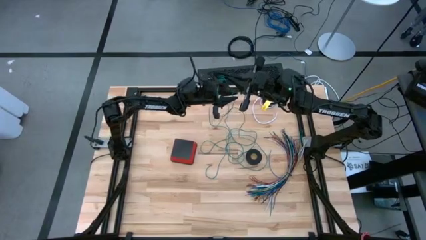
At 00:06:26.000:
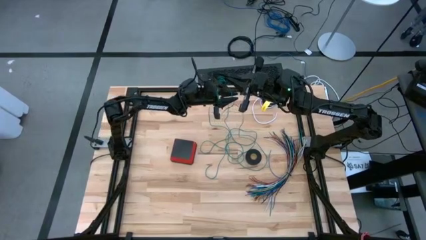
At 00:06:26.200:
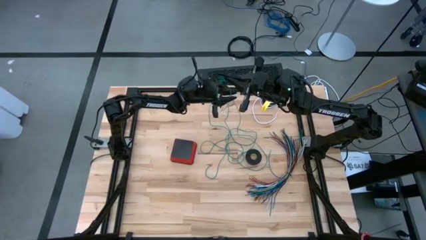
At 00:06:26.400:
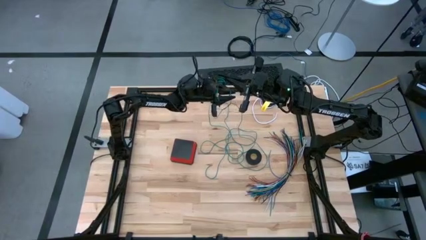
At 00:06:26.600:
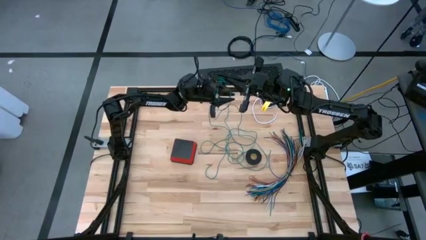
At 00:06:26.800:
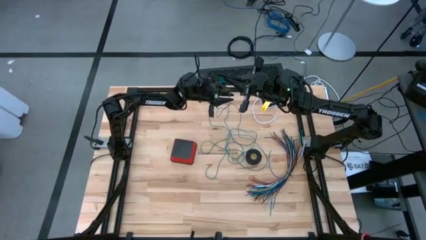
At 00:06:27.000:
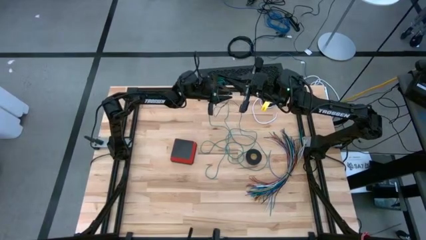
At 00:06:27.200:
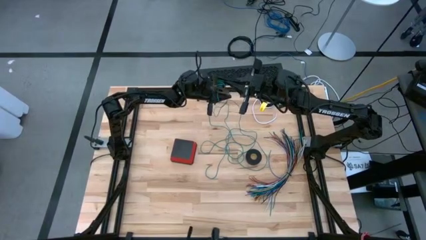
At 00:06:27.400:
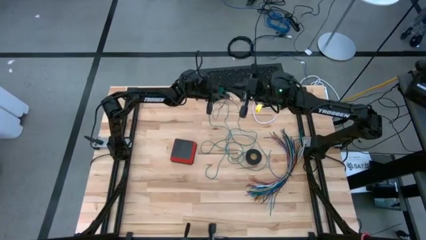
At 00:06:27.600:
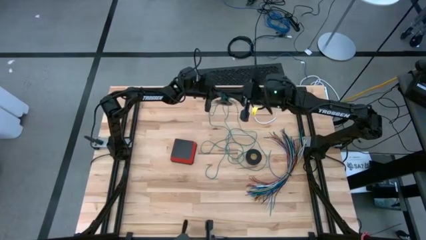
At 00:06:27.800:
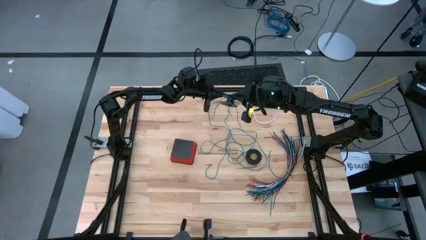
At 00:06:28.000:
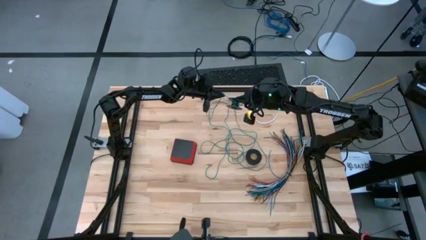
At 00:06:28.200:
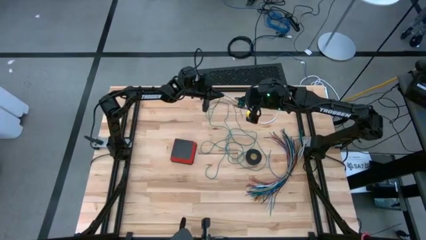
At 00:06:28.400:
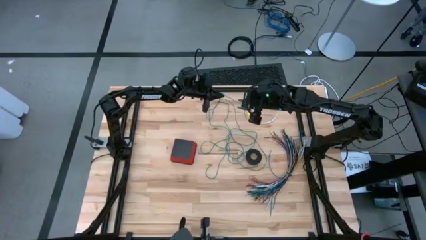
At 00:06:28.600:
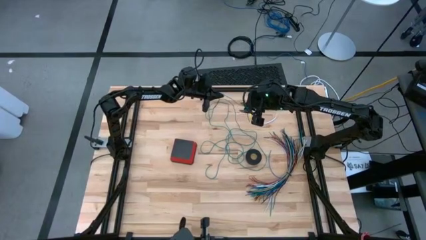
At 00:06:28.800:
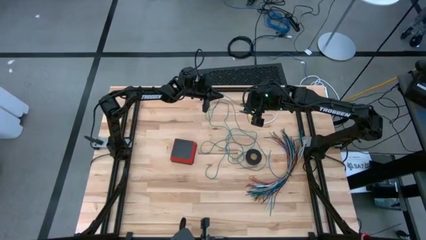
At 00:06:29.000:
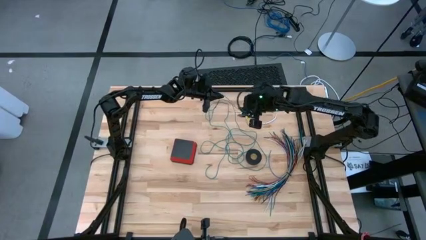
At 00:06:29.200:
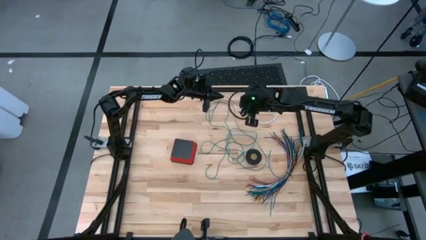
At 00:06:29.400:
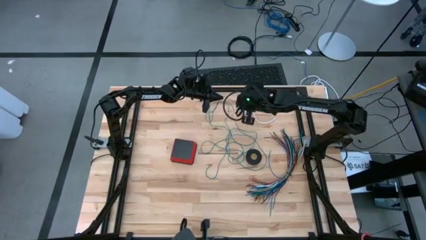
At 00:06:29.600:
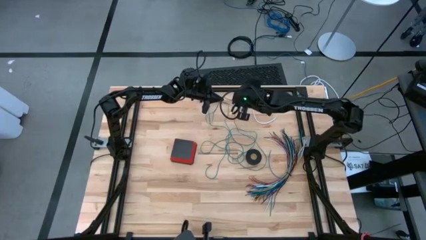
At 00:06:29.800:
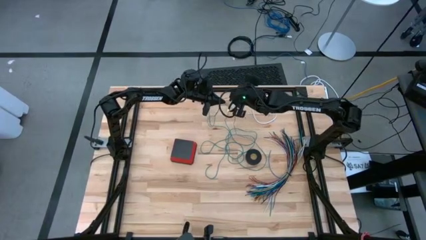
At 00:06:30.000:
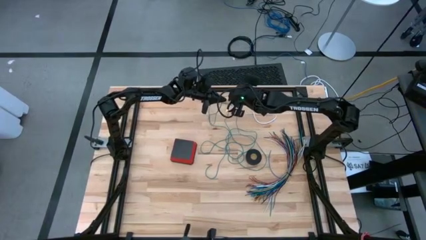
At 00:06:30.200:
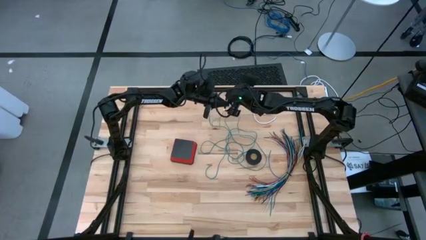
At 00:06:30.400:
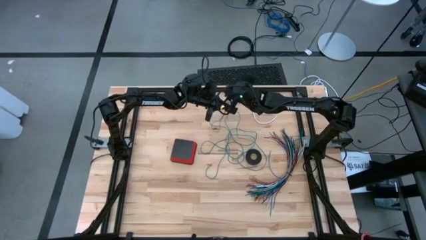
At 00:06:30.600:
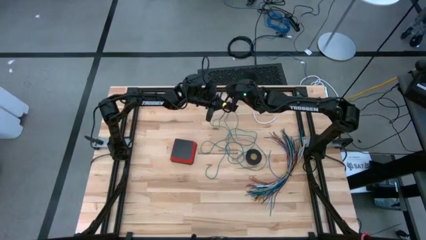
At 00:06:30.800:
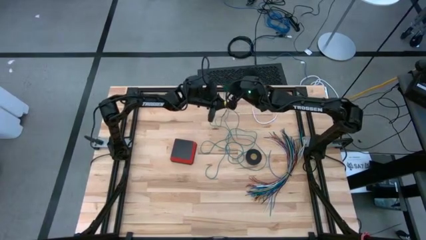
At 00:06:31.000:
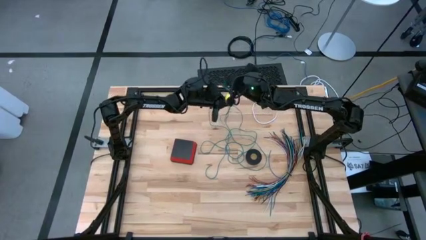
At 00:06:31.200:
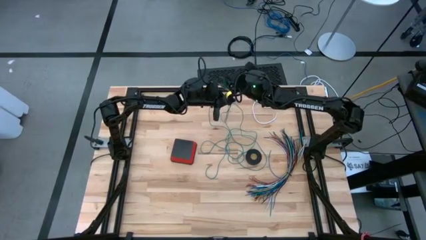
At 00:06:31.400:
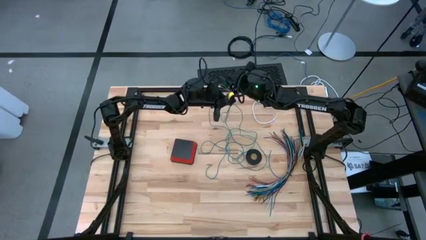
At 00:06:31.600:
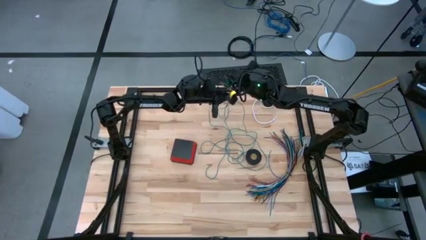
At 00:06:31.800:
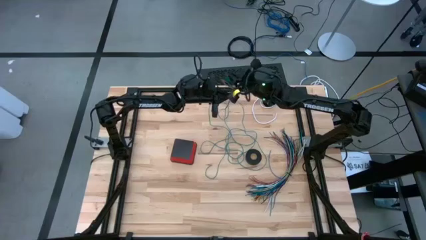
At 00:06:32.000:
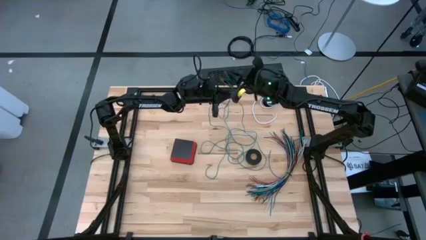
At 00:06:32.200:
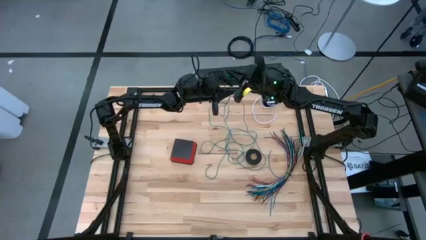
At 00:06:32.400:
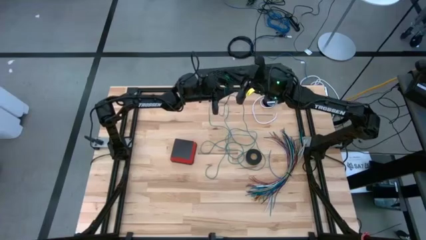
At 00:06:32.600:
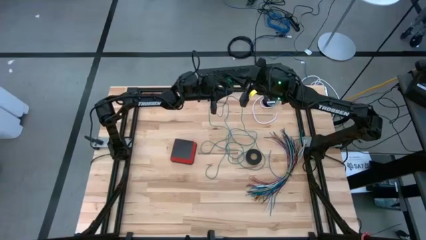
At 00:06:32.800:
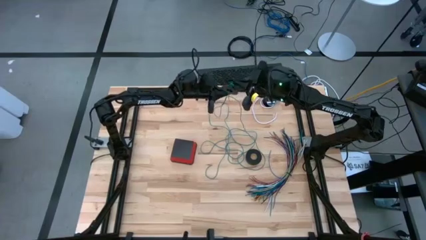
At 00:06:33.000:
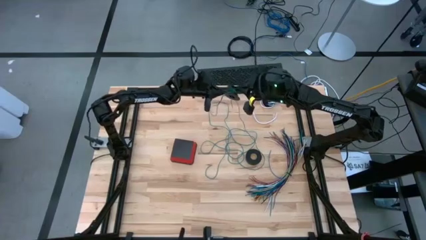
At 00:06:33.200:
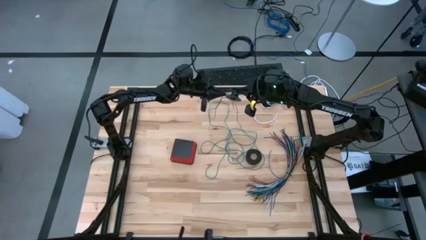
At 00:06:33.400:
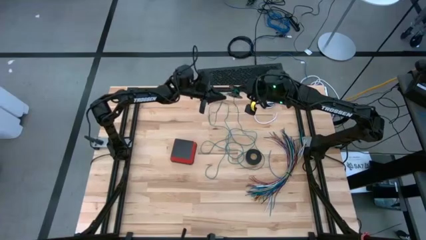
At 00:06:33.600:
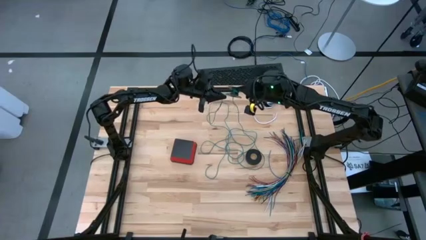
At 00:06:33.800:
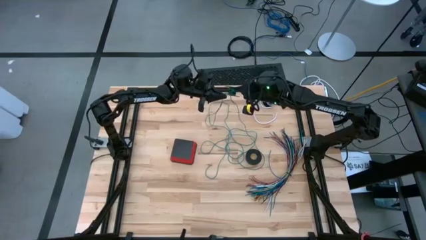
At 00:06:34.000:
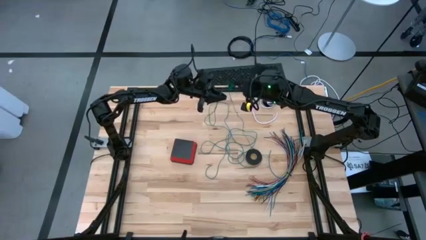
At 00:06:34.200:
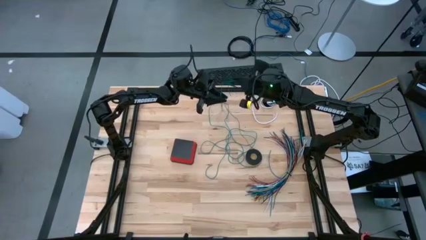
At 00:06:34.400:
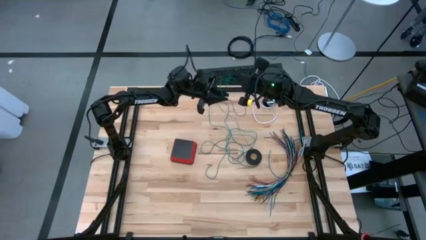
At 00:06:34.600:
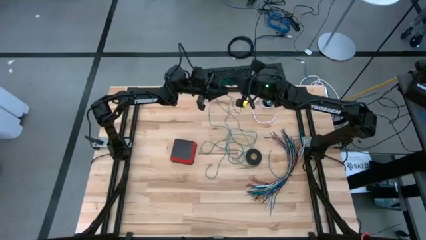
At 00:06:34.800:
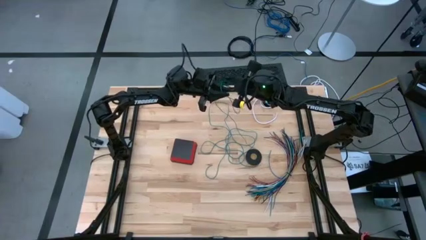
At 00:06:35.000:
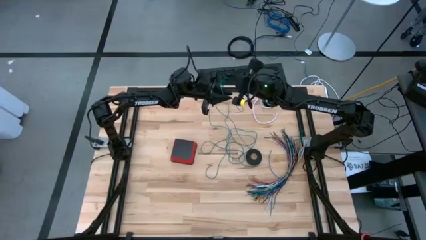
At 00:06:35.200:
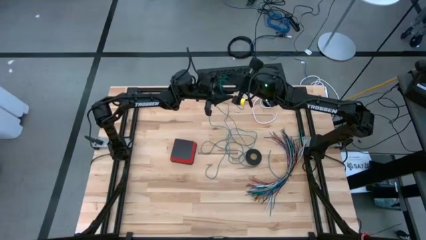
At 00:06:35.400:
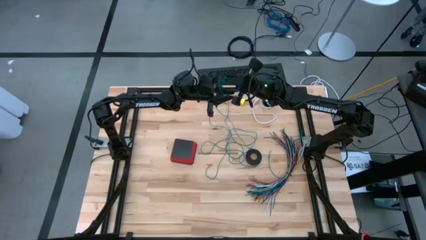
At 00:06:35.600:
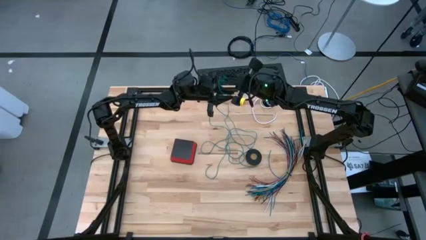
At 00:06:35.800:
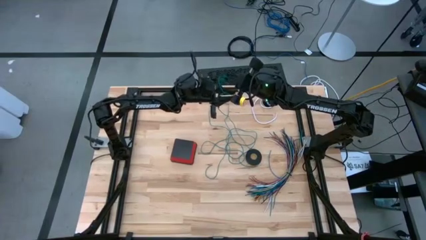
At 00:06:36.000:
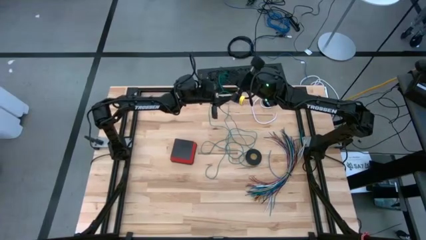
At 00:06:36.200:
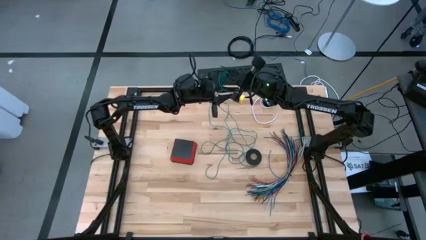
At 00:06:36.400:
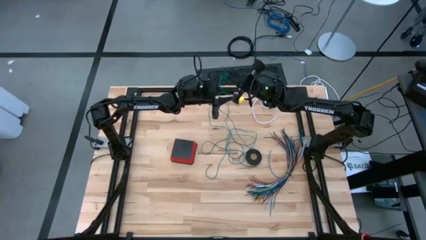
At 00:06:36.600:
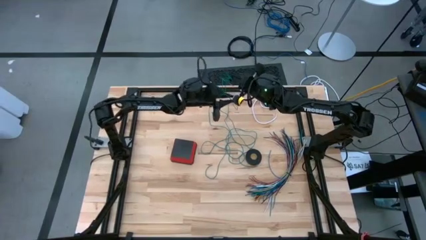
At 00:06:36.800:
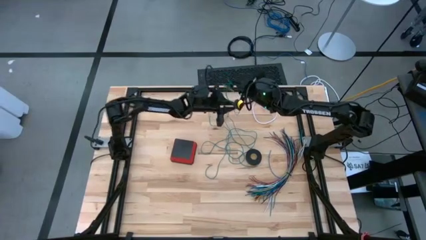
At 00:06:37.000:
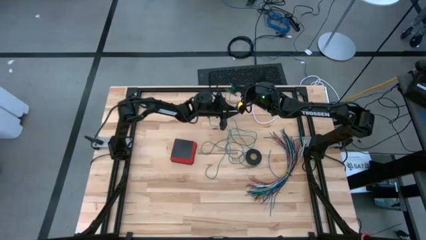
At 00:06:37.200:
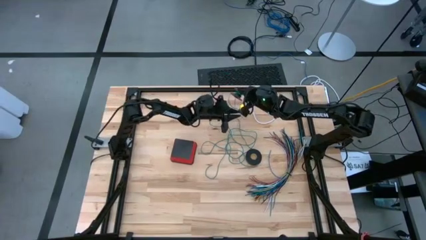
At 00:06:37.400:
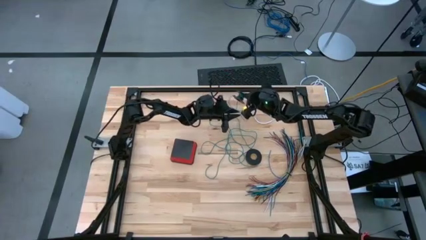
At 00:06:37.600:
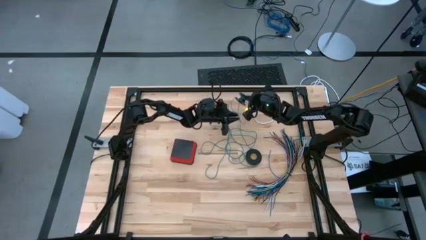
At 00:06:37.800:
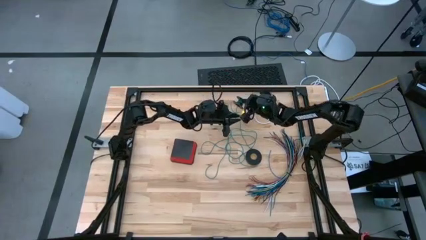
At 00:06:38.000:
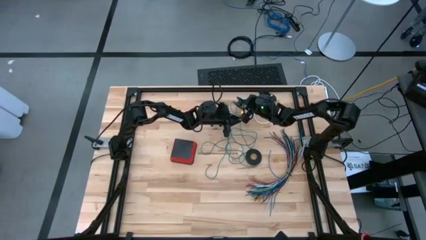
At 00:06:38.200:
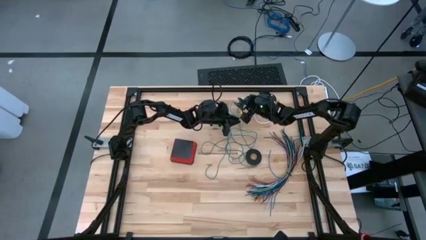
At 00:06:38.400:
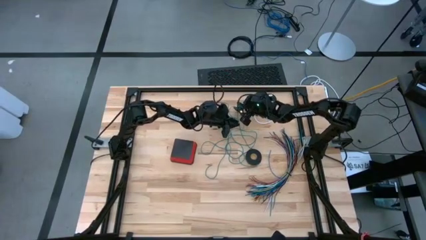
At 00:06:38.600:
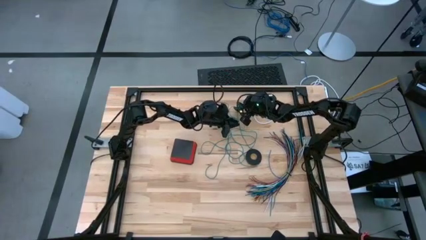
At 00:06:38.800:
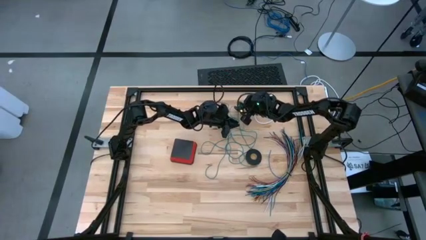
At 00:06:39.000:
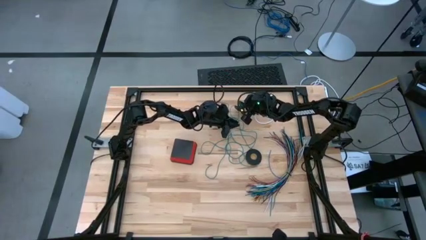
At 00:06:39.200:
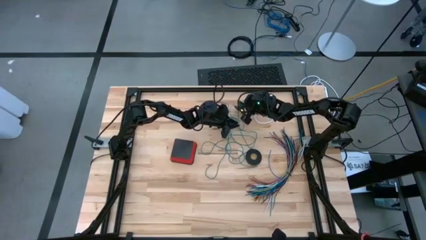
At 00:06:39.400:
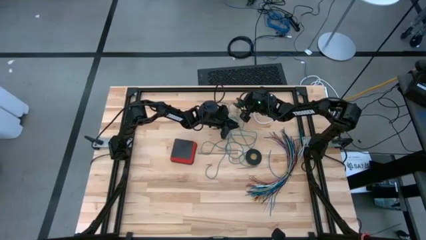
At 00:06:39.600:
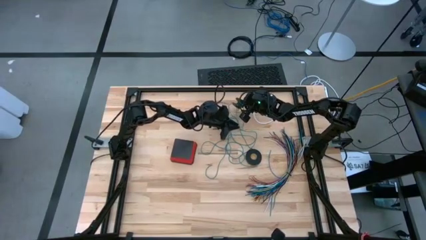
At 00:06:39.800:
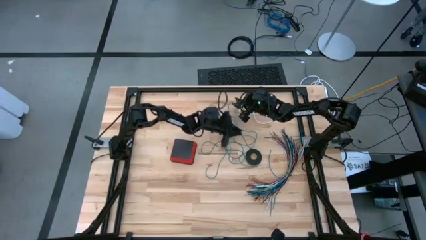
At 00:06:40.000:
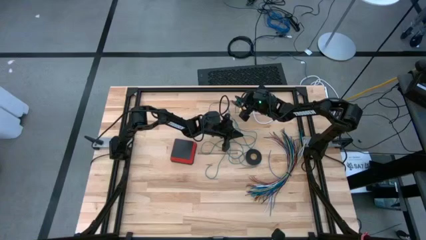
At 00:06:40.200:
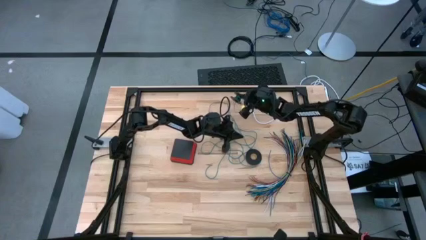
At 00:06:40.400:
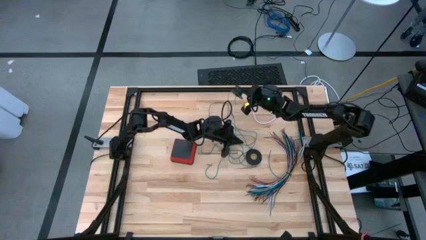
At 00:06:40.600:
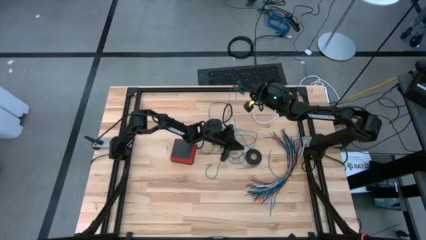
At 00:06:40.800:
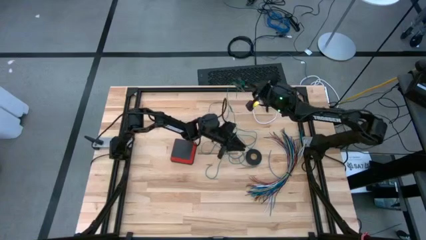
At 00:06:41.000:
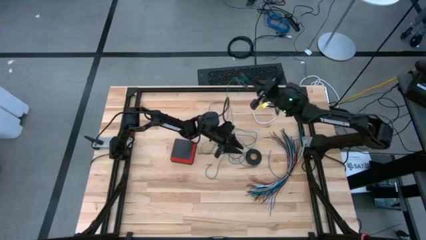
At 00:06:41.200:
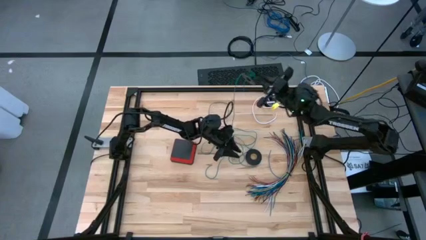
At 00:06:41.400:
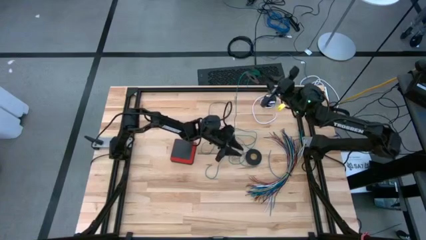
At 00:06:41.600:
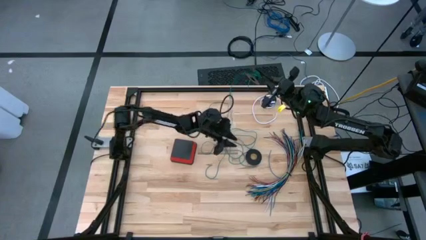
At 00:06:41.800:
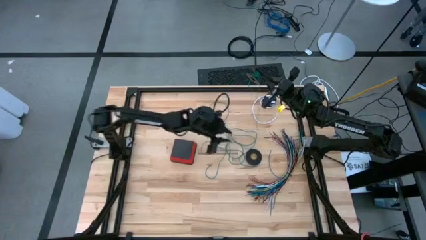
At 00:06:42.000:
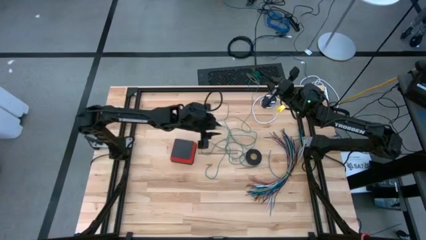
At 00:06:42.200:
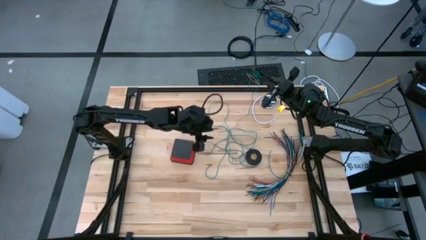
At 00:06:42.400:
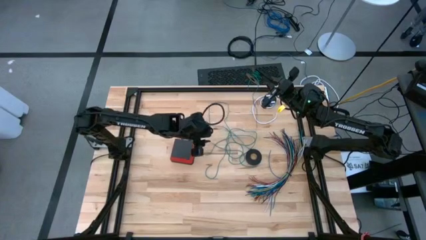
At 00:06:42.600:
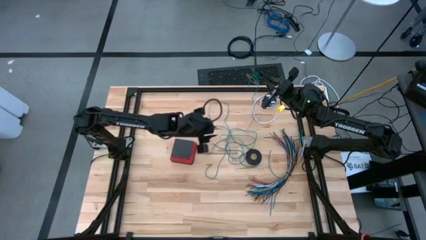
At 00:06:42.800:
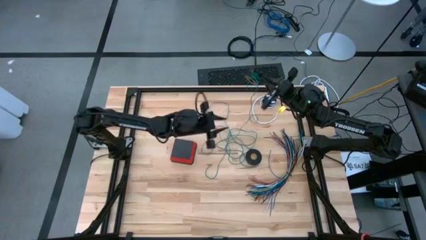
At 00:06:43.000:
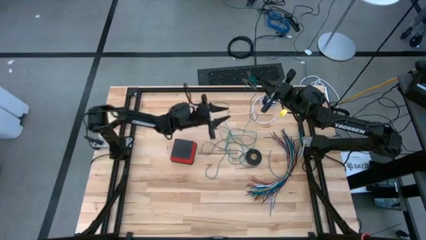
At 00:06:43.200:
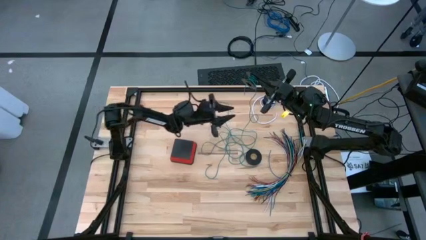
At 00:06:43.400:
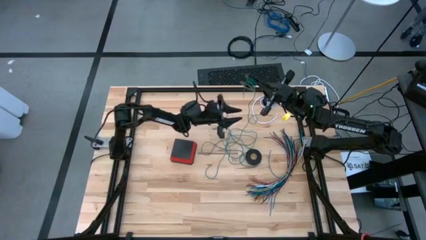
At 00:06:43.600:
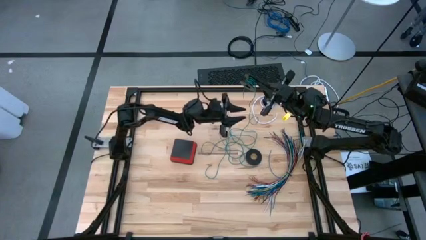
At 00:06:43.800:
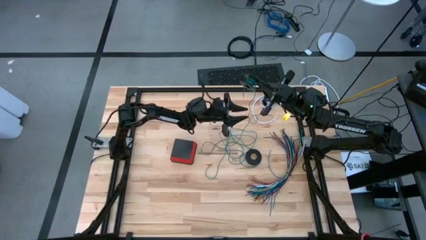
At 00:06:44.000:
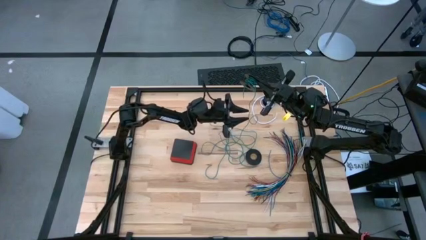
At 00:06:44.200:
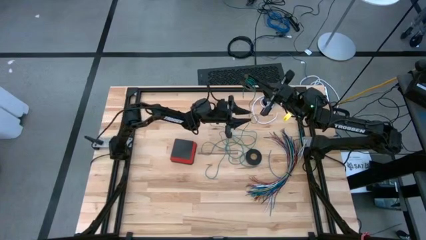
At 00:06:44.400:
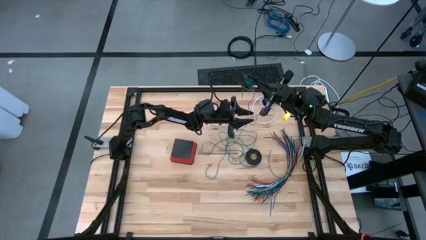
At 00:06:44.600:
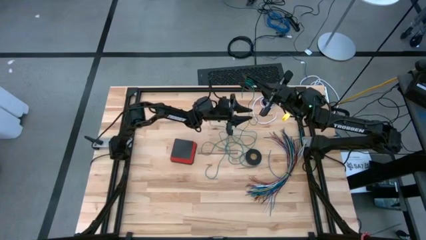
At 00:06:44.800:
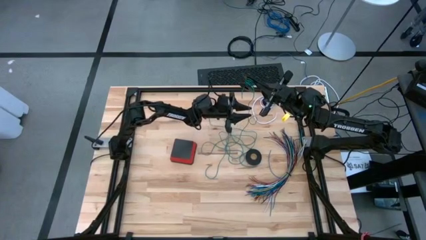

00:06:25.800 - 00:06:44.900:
Task: Coiling cords
Coil the green wire cable on the spool
